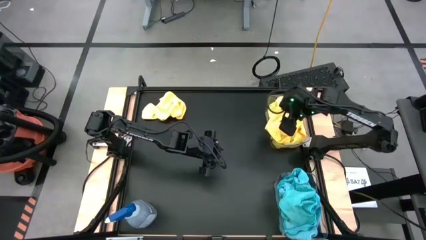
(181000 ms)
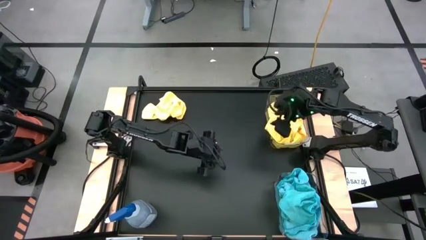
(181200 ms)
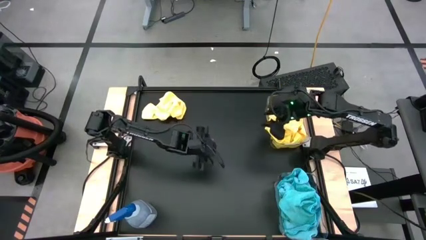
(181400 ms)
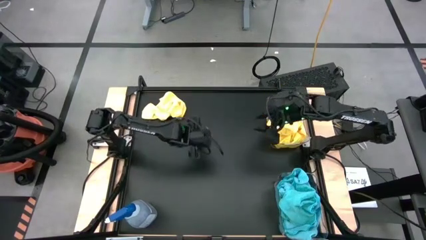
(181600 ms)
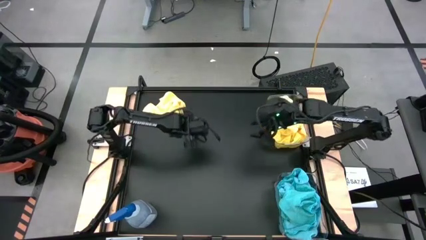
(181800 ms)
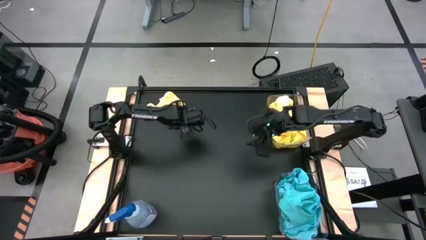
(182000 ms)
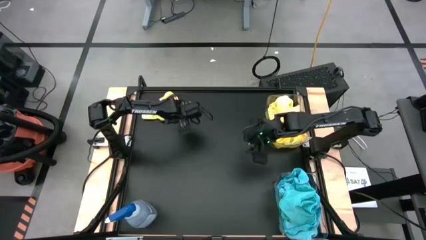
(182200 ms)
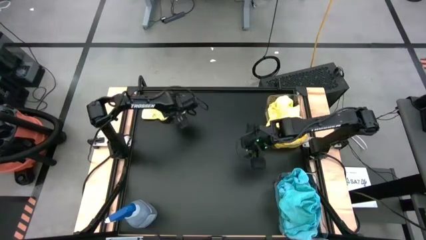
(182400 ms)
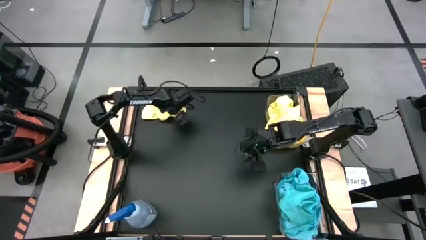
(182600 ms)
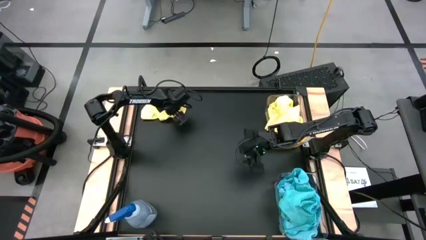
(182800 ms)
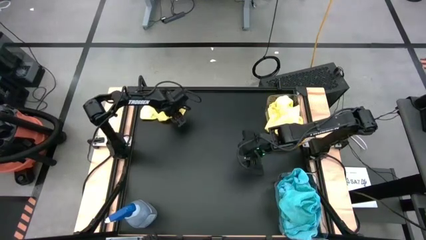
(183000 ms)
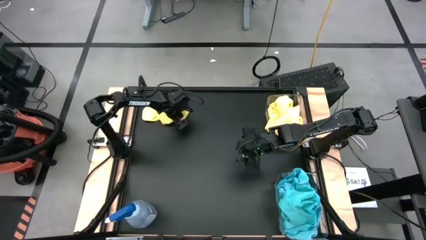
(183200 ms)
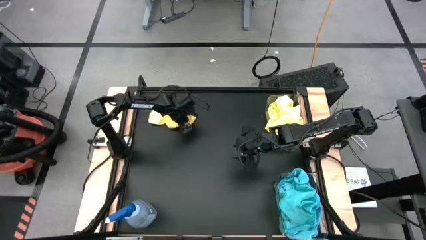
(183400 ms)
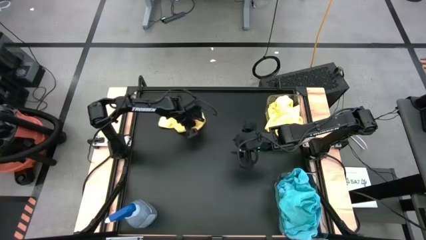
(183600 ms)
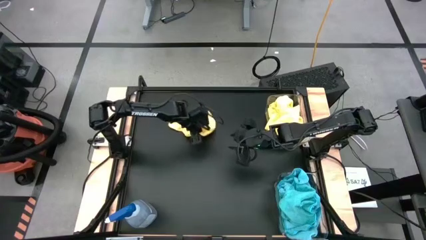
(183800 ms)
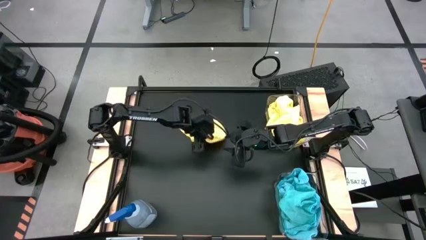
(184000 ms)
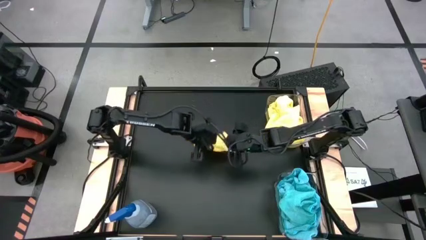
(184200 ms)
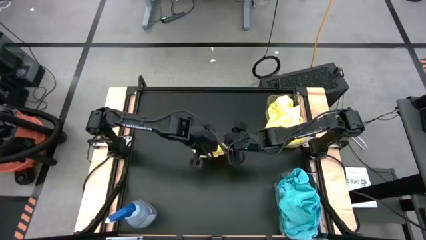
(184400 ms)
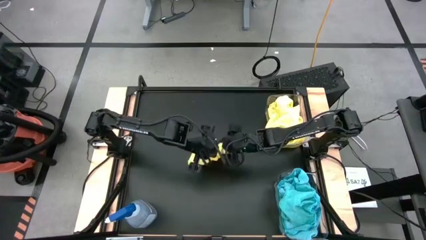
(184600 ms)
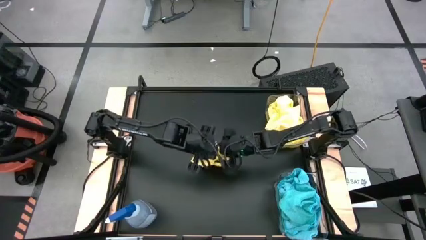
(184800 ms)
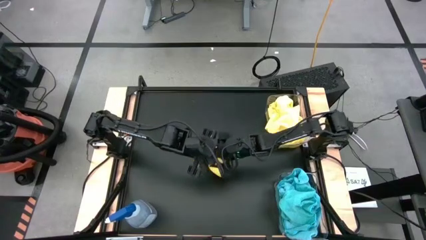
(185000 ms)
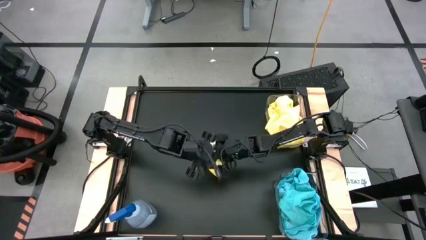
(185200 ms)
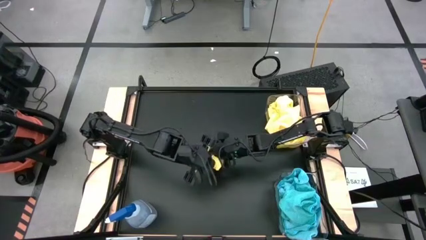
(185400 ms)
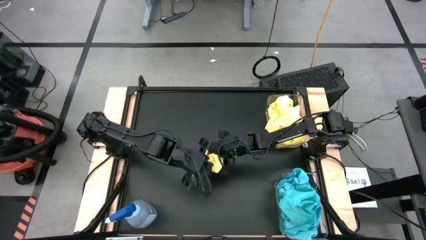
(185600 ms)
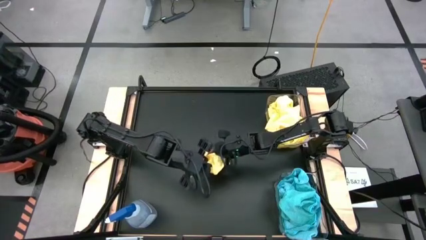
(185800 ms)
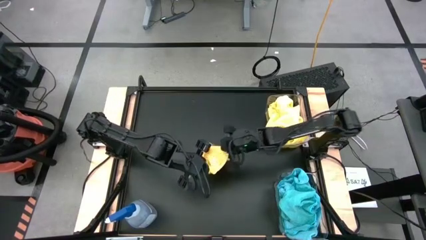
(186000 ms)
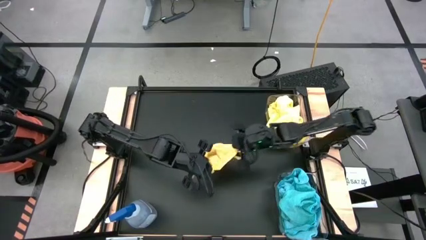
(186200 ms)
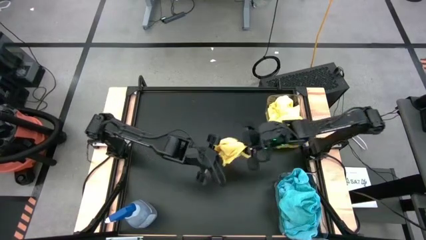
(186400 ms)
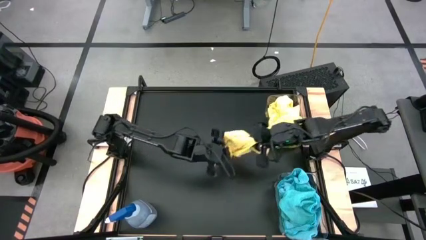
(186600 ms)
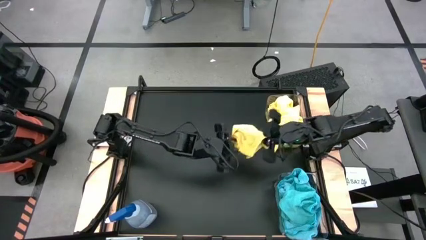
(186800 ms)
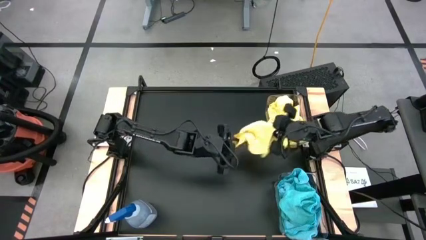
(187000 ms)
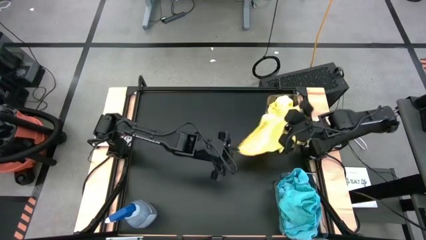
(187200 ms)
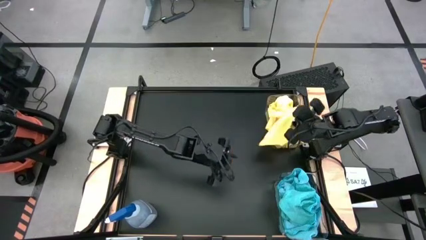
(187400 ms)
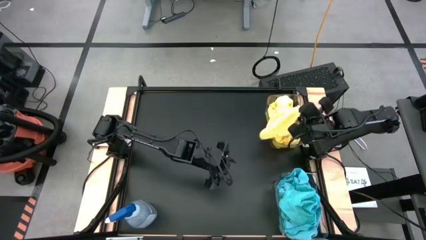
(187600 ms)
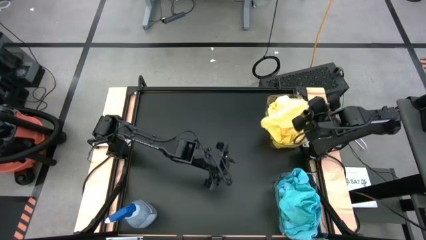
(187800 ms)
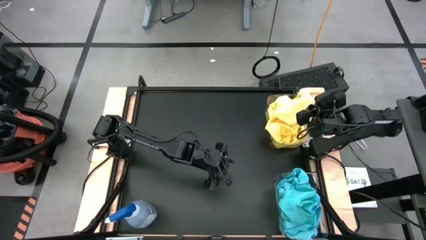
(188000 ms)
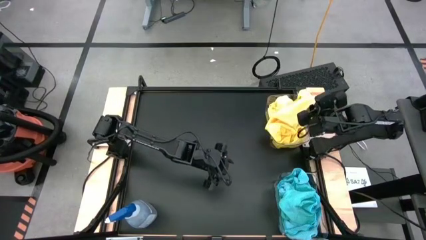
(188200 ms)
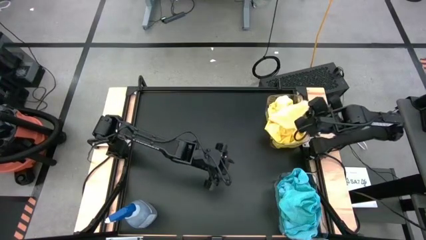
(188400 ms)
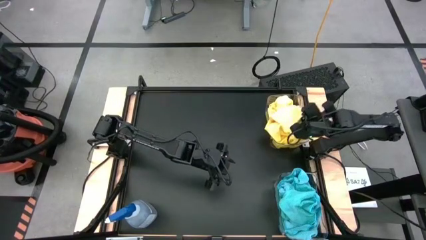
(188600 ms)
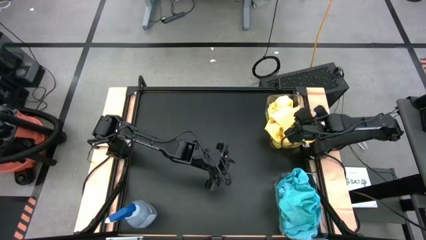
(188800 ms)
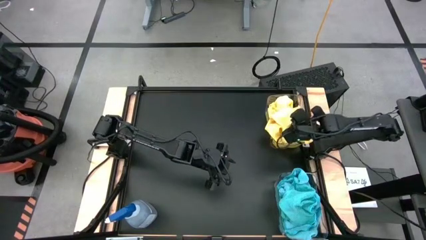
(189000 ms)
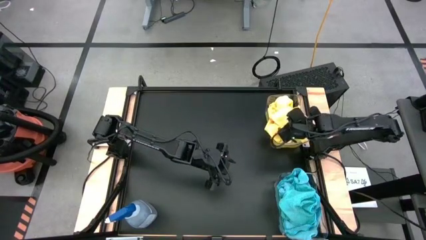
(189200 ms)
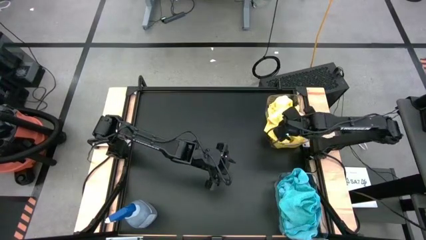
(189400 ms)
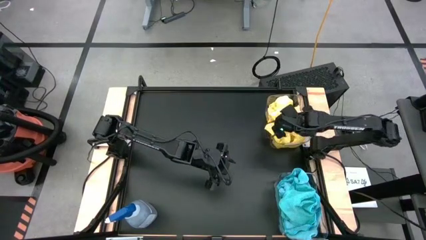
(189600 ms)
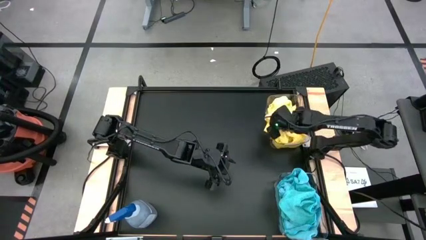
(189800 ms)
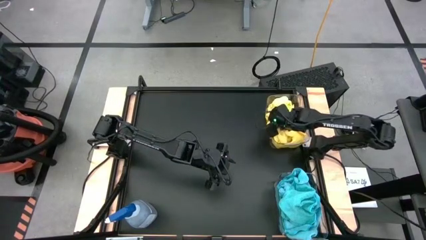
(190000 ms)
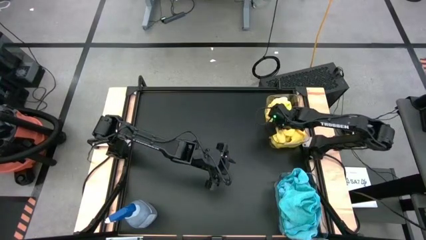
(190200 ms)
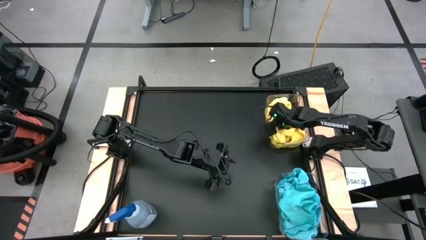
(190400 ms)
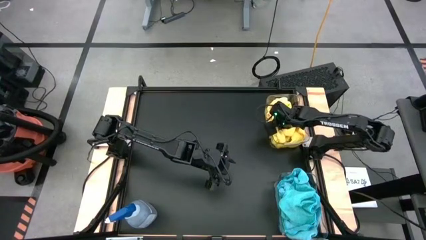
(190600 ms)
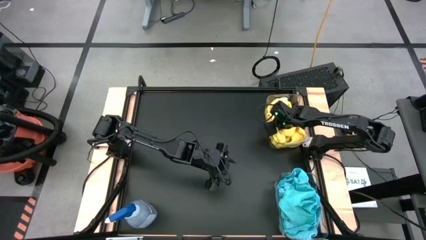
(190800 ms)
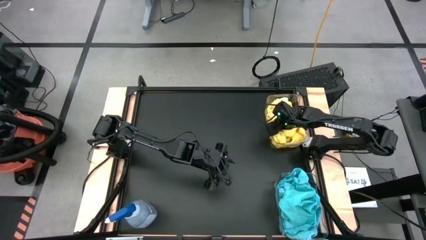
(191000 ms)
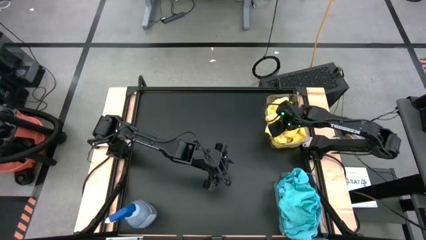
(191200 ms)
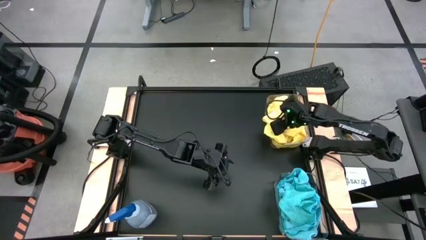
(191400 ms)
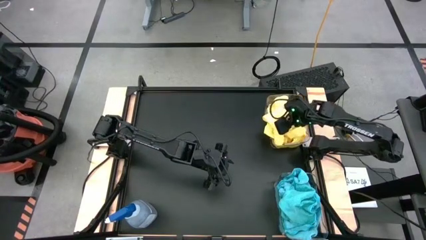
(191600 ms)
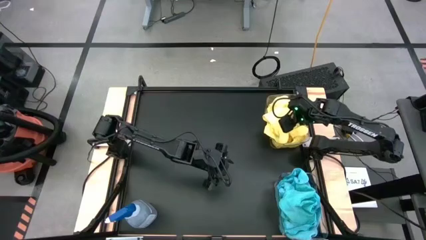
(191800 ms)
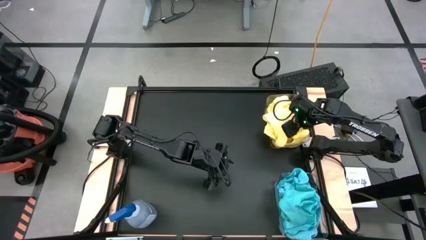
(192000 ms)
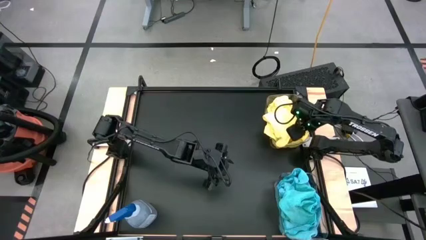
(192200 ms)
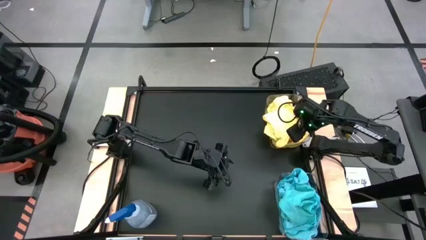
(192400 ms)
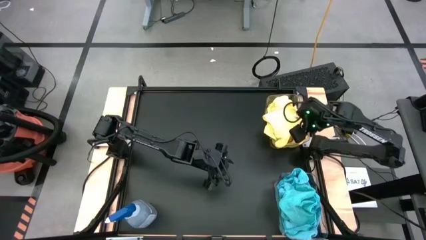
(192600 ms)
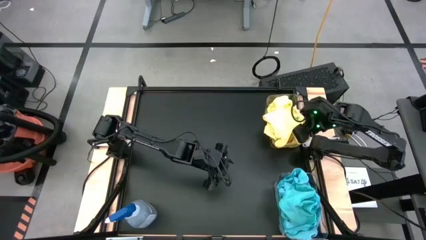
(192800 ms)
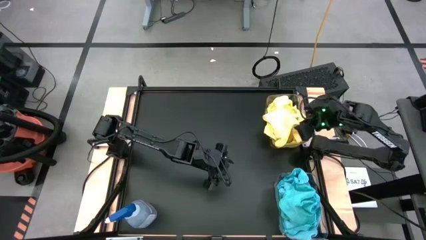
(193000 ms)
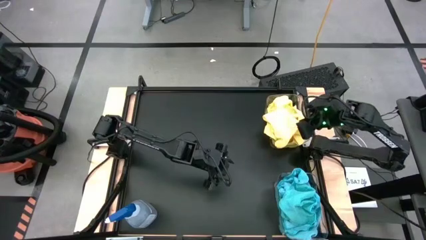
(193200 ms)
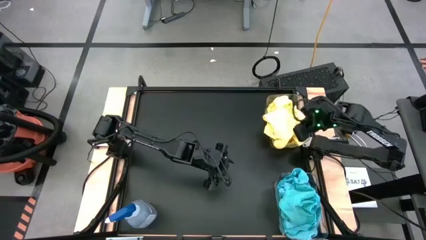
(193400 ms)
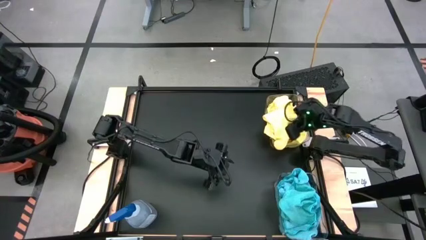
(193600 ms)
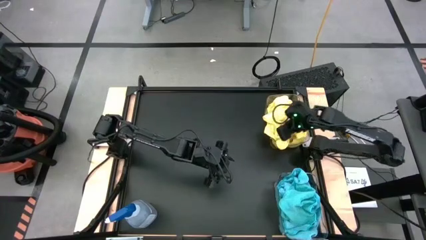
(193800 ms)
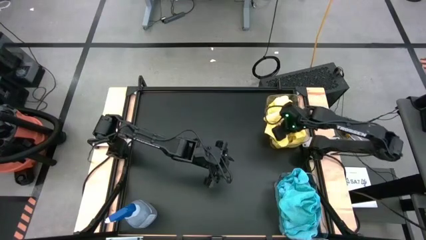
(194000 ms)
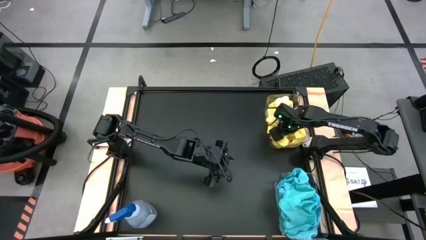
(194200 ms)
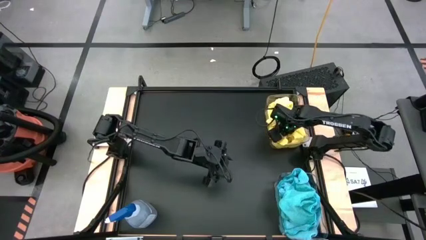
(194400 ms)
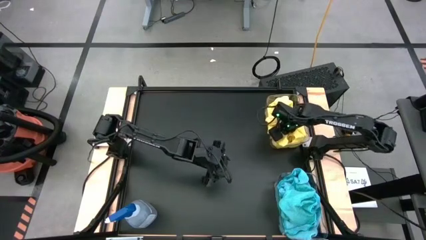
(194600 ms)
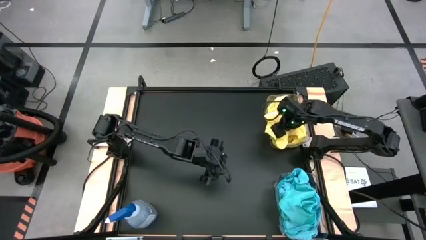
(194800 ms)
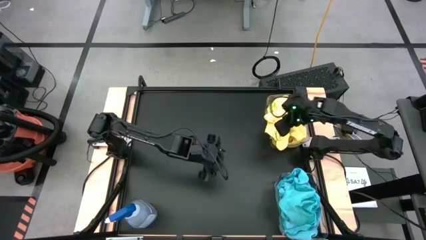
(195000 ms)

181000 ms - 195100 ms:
Task: Sort microfiber towel by color & place in baskets
Put the yellow towel into the top transparent bin

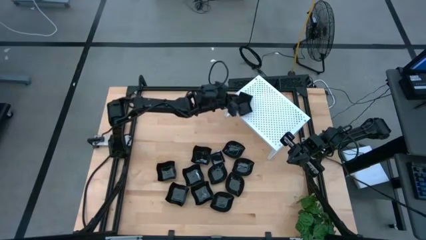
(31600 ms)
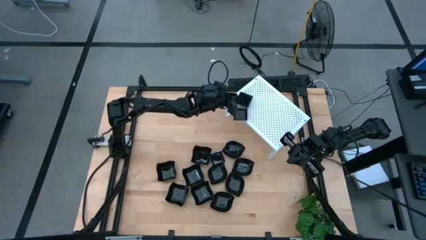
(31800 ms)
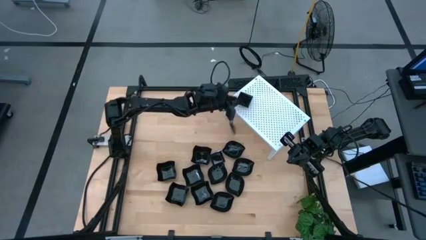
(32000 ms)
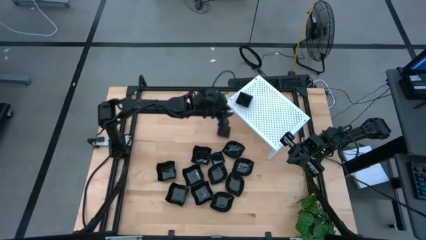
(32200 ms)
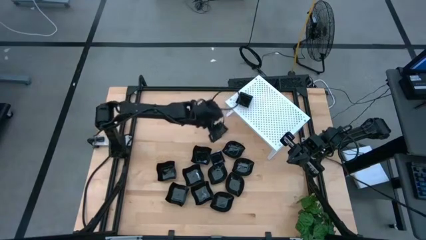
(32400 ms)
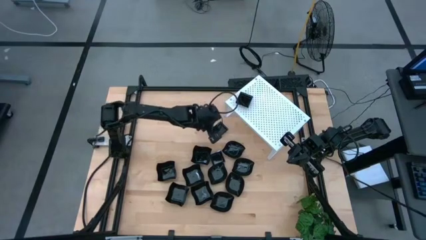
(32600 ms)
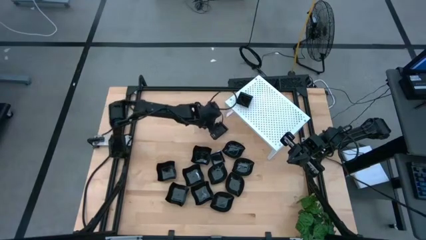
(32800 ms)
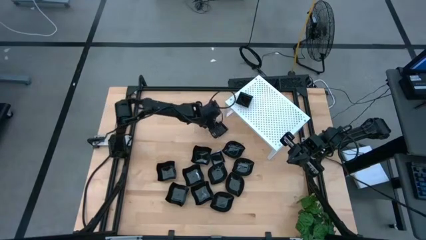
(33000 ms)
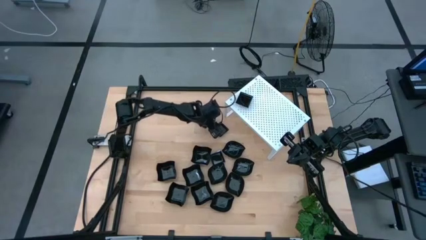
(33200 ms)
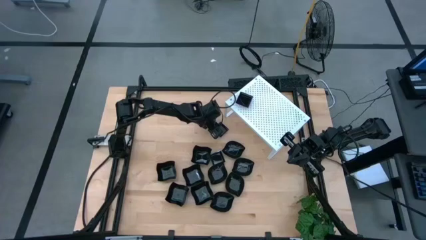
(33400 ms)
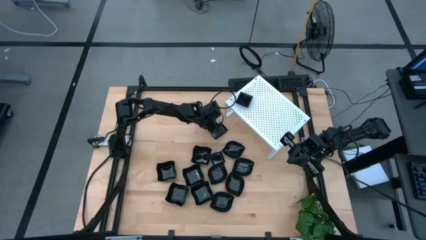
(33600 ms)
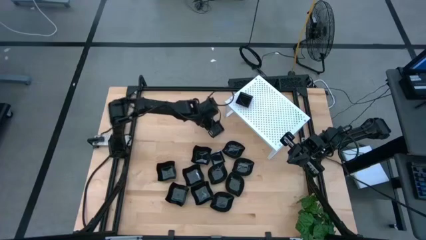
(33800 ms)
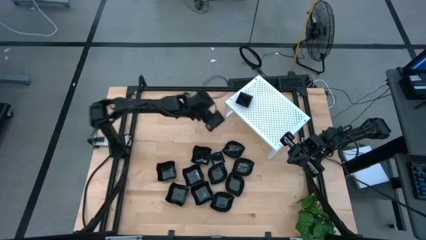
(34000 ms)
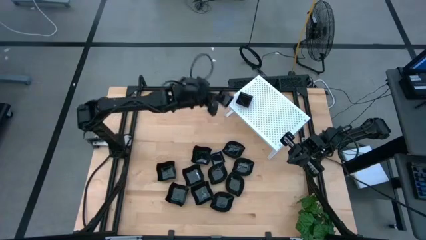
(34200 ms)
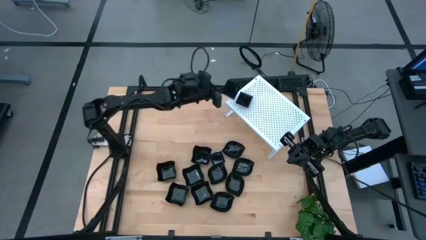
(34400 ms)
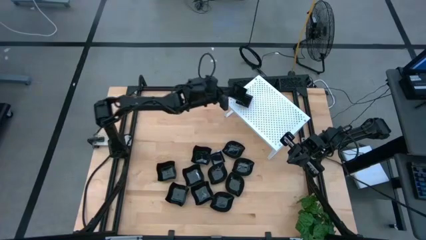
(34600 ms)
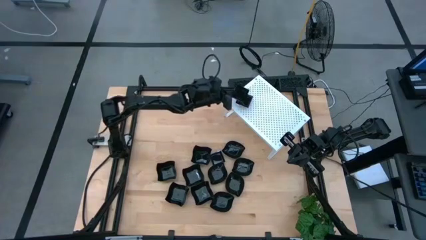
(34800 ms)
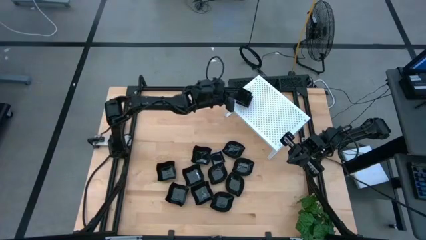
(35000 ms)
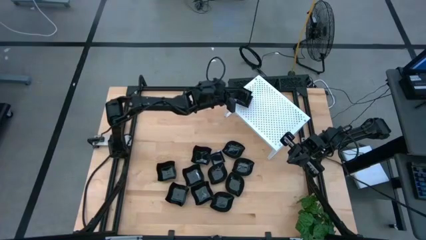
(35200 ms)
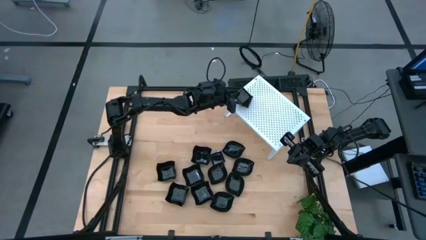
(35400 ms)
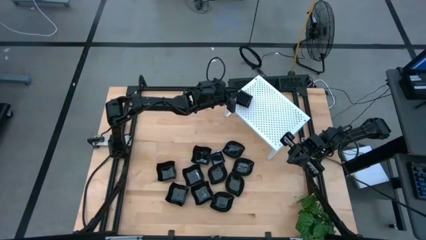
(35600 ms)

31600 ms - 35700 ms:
Task: Pick & Place Mini shaped plates
Stack the black square plate on top of the other black square plates on the shelf
